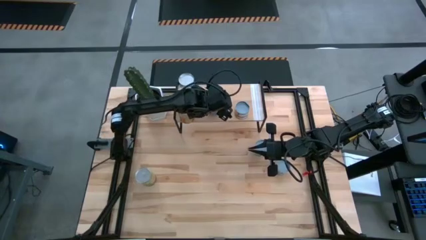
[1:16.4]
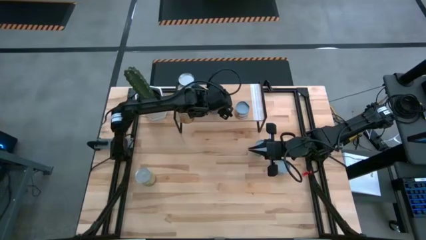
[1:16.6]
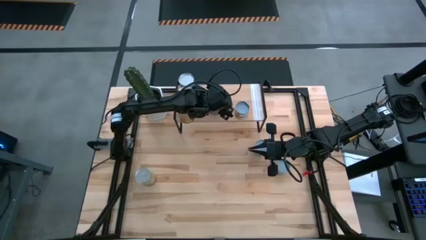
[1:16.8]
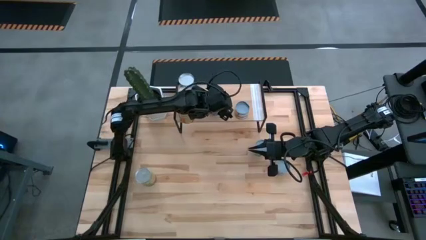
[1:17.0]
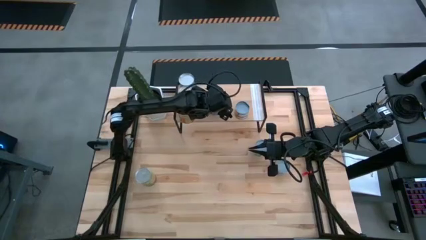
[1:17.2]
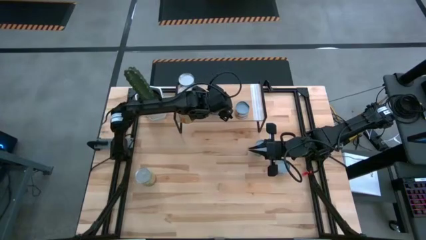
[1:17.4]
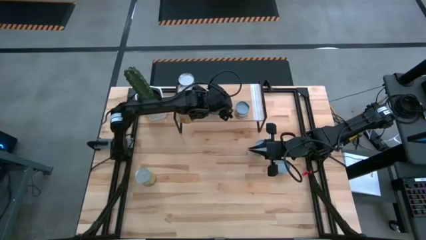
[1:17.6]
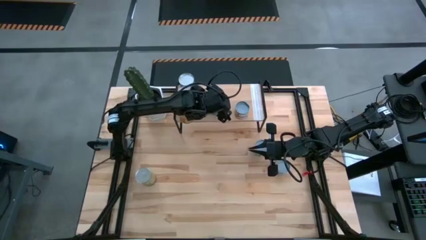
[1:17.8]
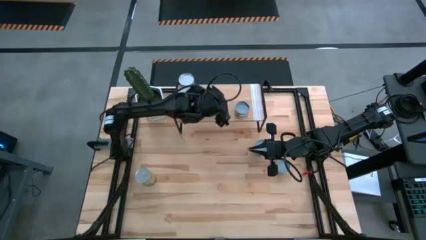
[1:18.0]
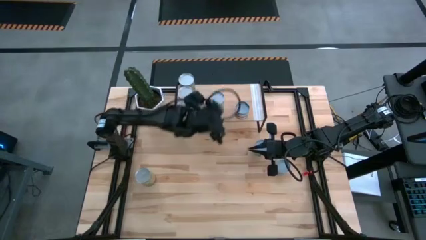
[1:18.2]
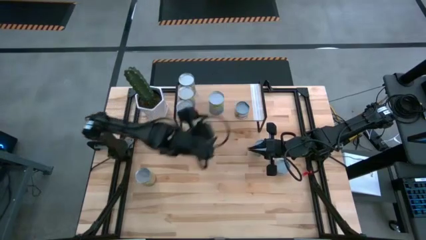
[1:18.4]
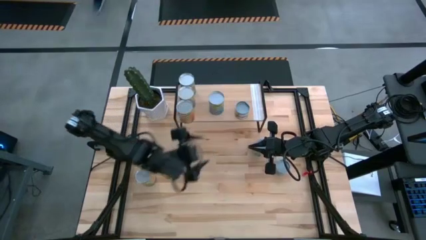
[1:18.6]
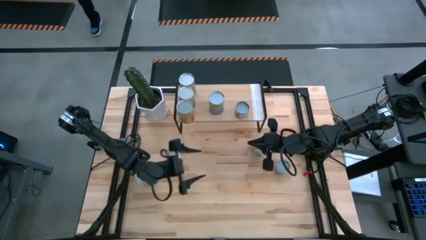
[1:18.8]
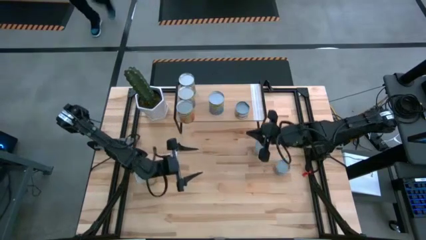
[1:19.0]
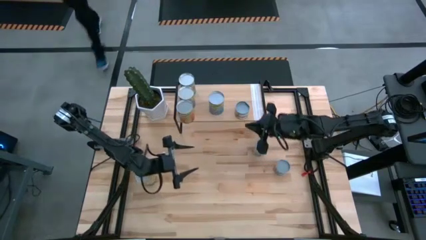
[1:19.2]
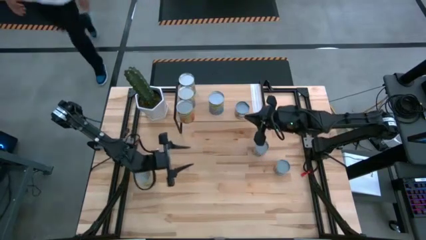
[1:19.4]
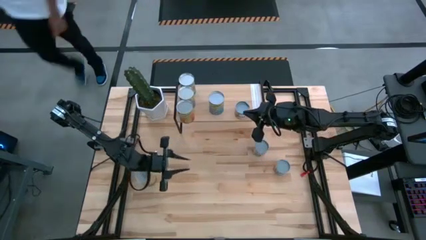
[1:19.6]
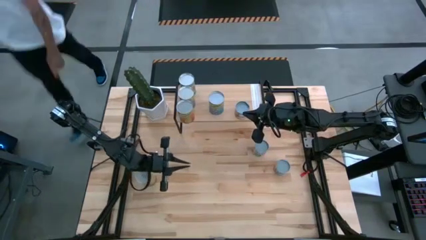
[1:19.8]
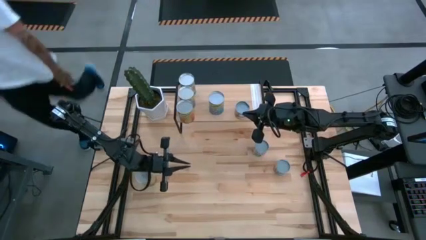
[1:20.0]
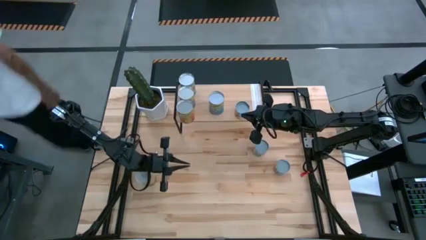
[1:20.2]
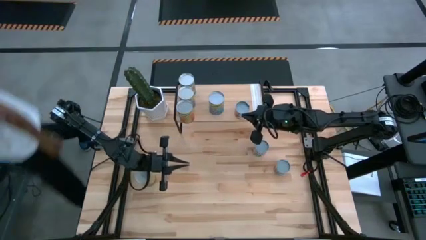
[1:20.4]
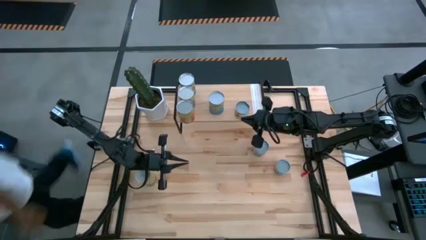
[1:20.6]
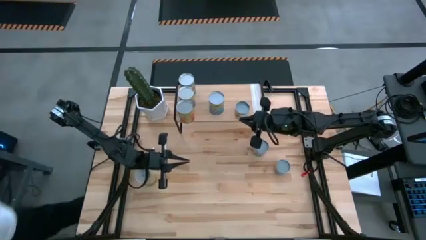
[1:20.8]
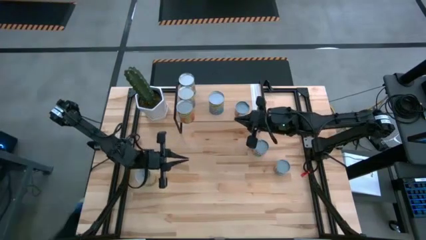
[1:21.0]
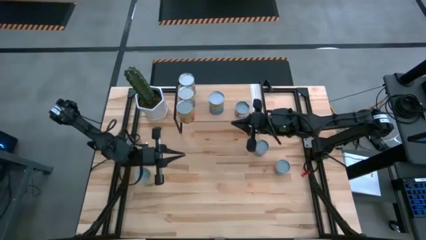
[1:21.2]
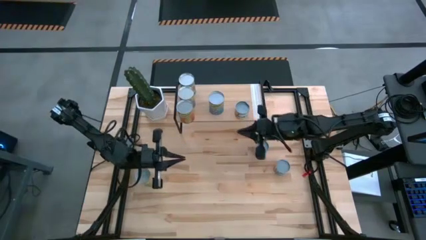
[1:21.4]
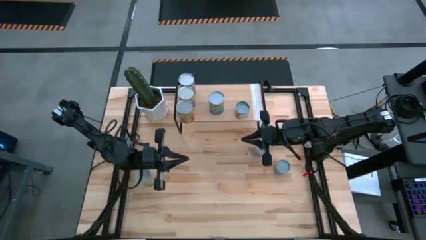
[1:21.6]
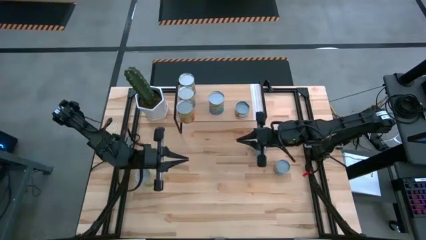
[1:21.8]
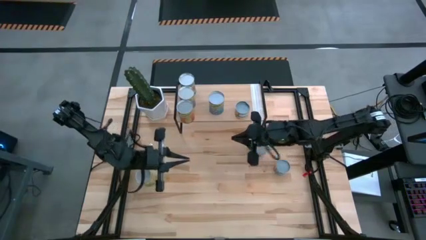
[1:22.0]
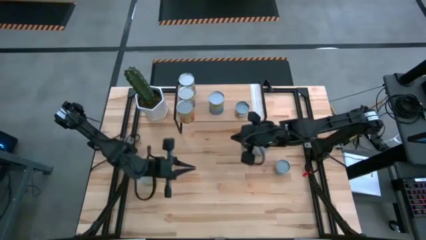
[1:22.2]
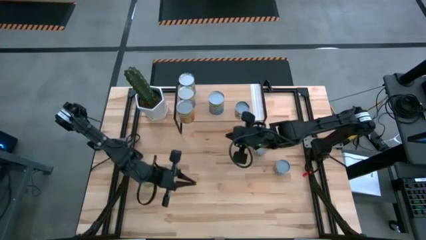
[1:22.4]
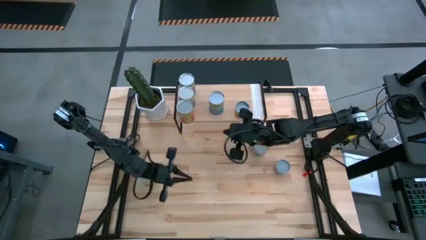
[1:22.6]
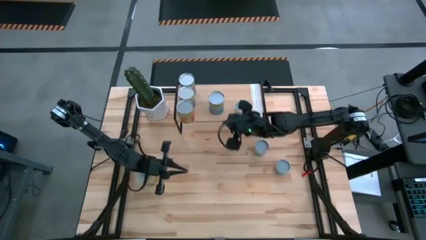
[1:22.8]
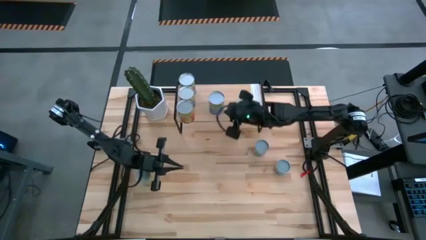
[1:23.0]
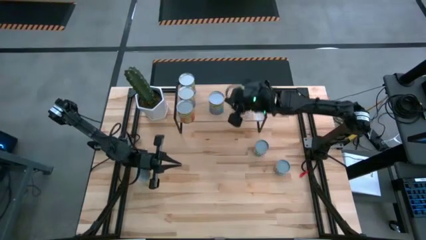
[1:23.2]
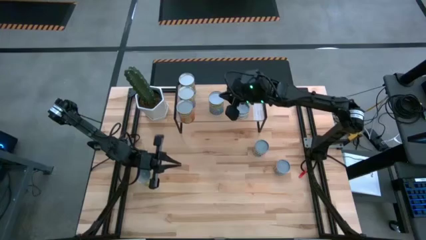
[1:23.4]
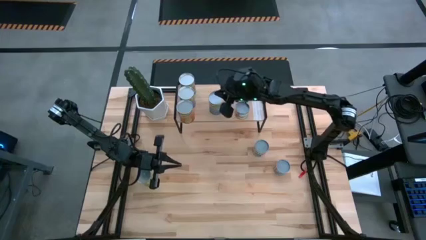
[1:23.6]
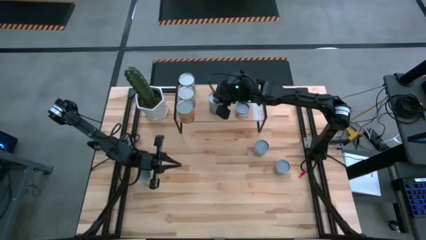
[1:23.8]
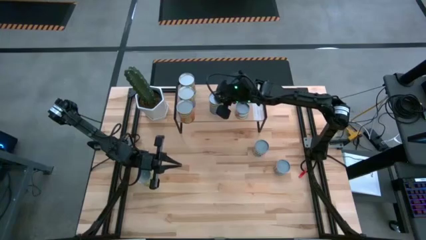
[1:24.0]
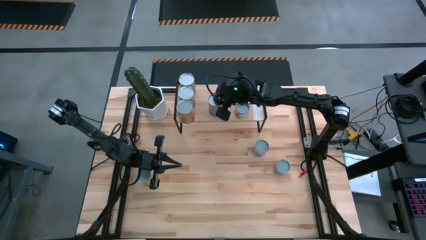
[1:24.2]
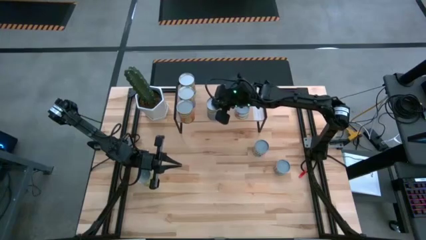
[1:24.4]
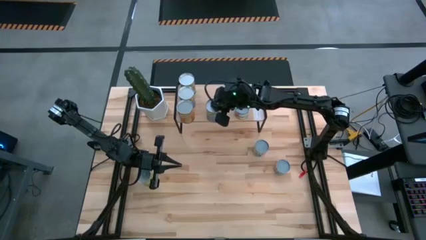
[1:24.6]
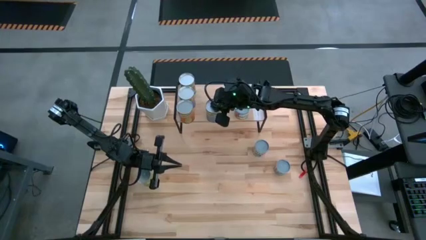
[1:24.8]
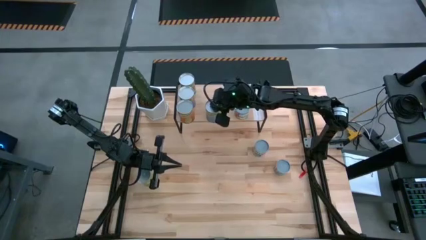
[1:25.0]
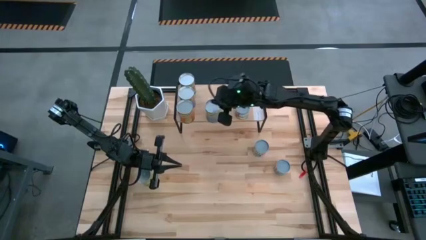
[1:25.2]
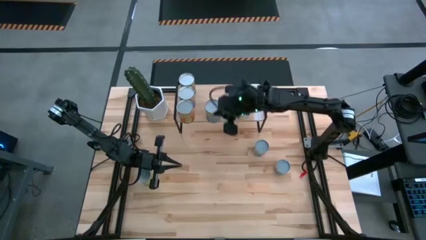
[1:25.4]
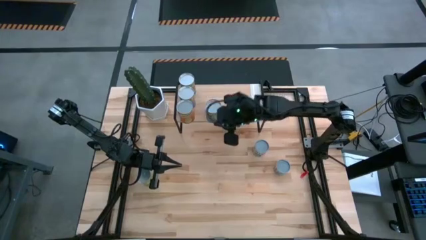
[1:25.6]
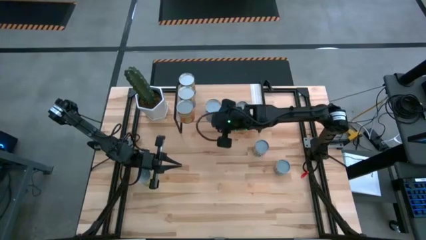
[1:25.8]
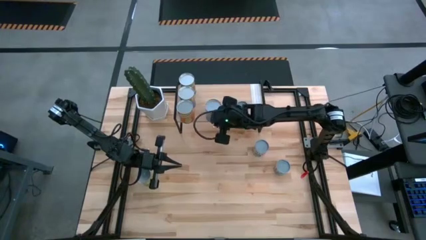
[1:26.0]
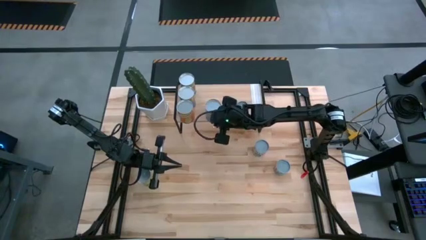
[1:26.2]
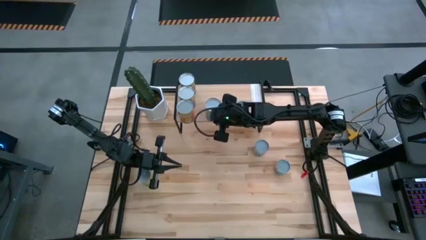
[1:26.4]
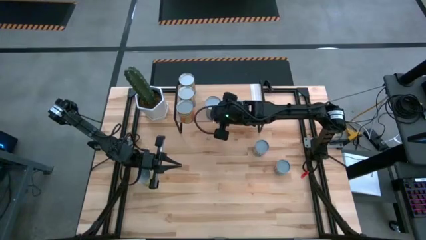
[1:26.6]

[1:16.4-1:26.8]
Task: Pick and place cans onto a shelf
Put the canned cherries on the shelf

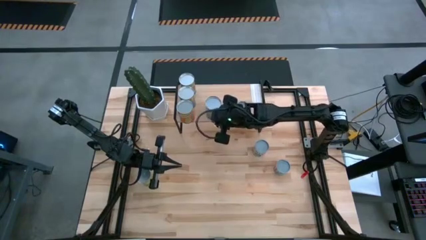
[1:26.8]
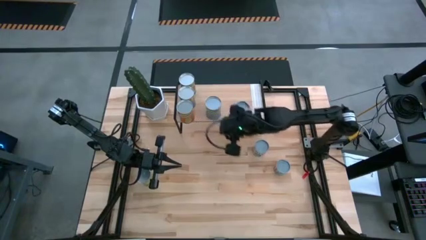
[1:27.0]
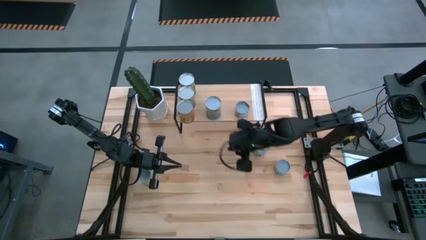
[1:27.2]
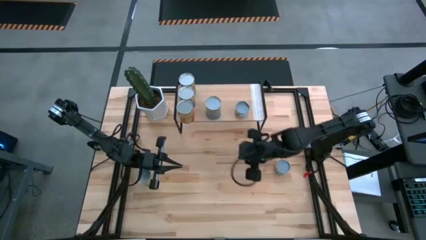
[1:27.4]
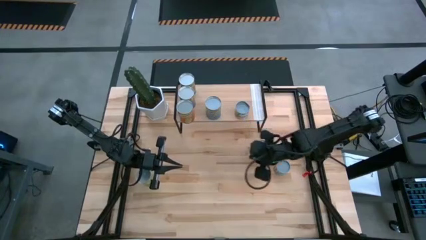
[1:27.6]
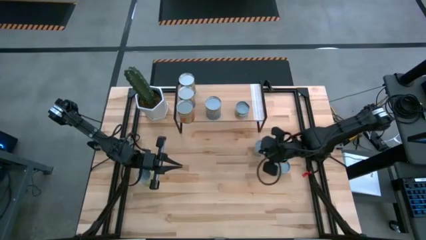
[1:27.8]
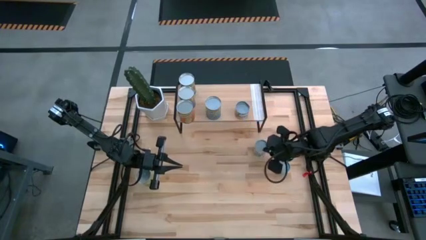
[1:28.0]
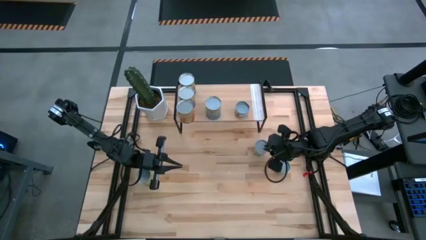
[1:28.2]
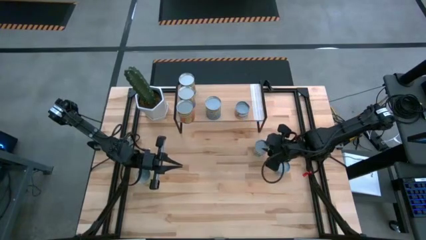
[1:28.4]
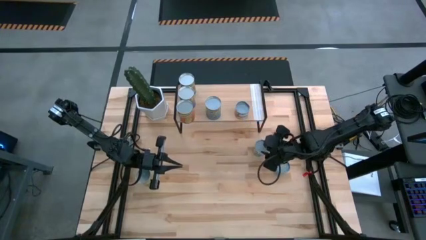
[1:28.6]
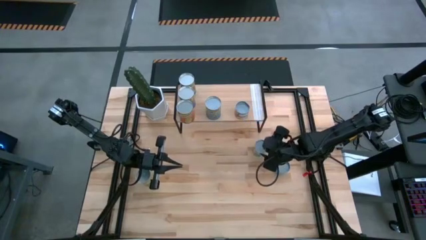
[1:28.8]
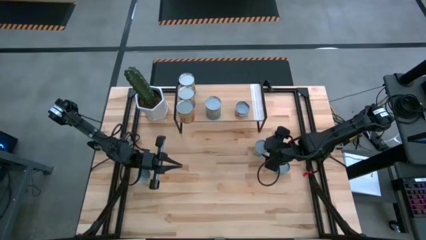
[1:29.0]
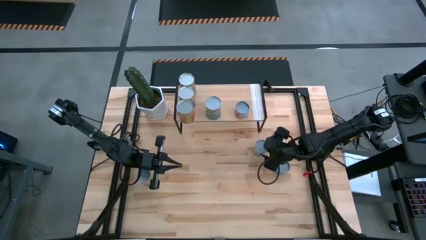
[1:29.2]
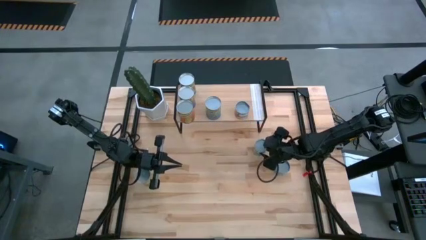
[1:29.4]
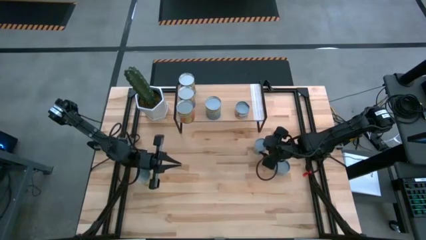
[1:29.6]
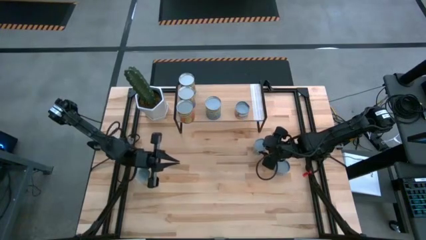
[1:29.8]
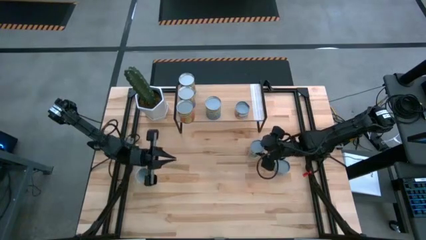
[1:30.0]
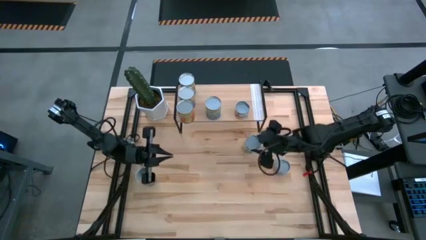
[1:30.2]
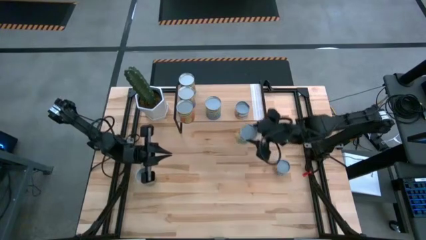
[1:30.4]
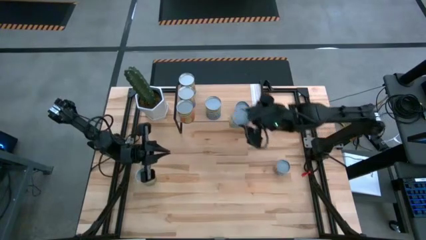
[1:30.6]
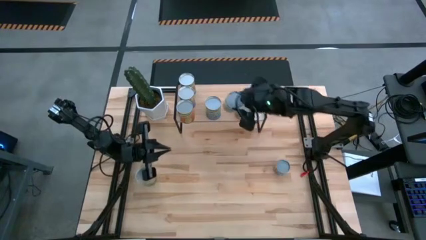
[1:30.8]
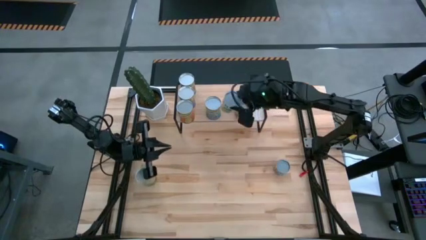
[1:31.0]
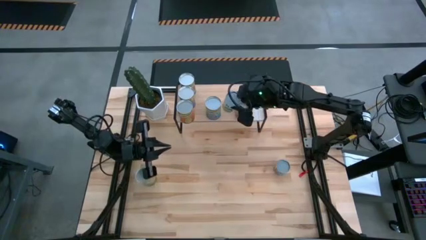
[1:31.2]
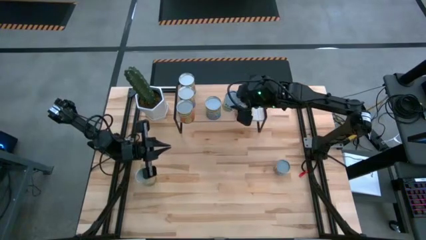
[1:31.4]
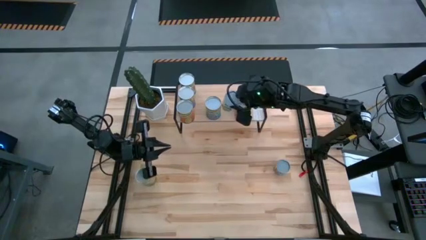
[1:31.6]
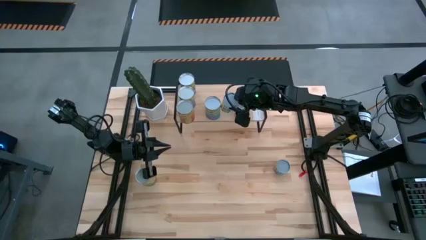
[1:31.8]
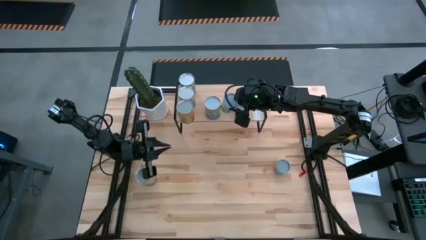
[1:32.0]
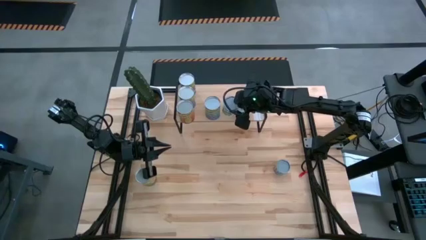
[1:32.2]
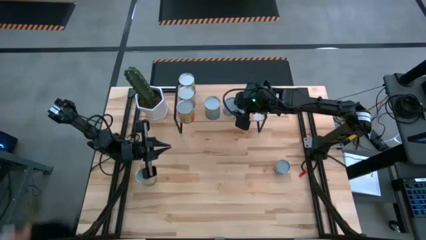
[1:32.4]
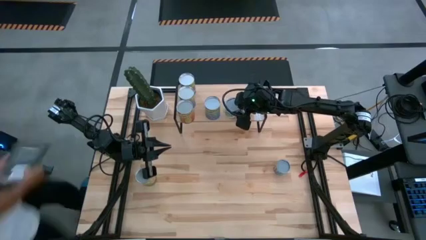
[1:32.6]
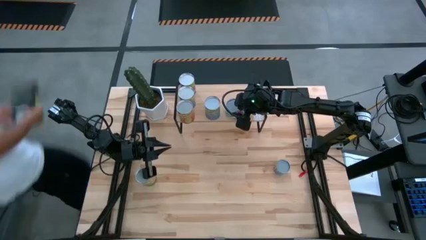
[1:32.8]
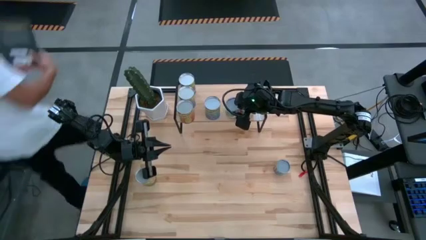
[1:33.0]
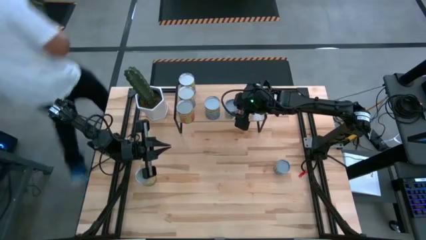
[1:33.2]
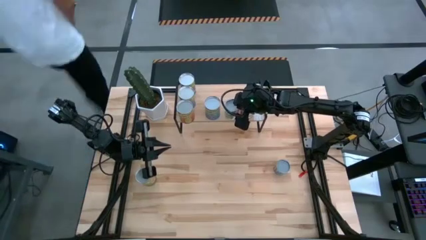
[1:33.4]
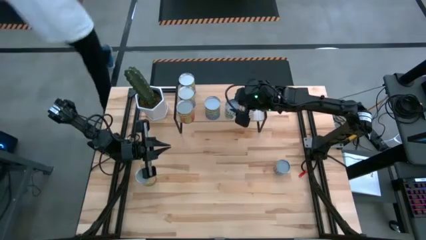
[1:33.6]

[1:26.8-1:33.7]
Put the canned mixed fruit on the shelf
